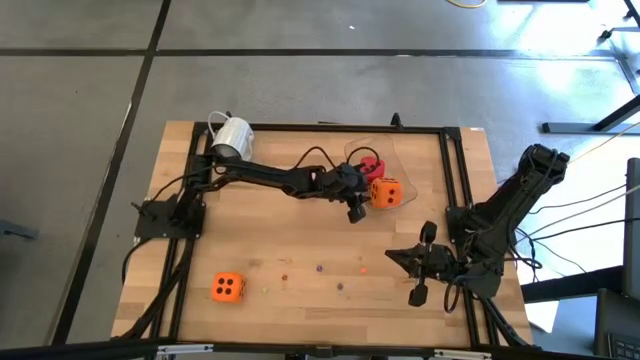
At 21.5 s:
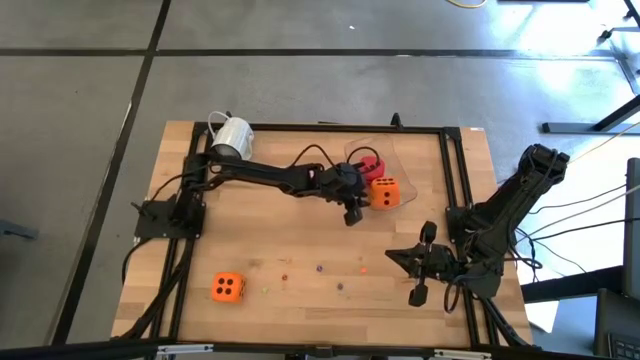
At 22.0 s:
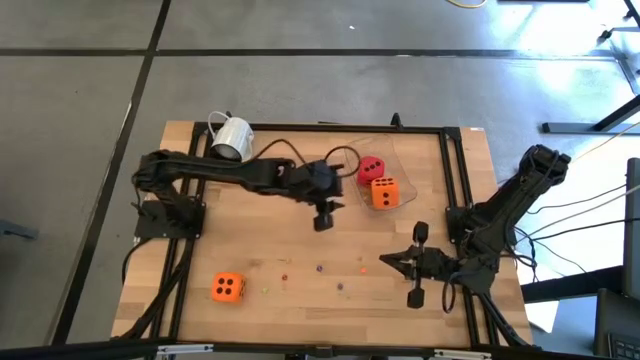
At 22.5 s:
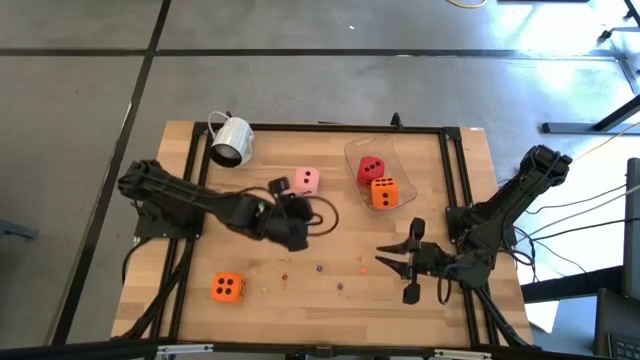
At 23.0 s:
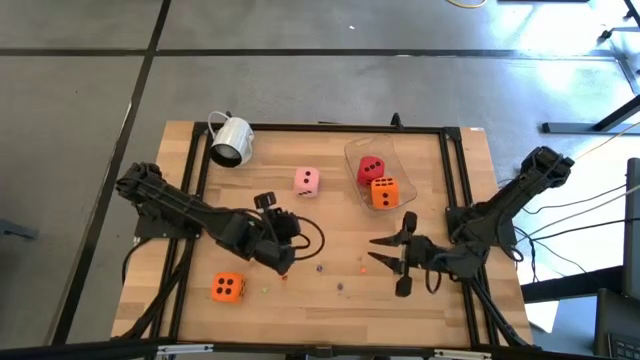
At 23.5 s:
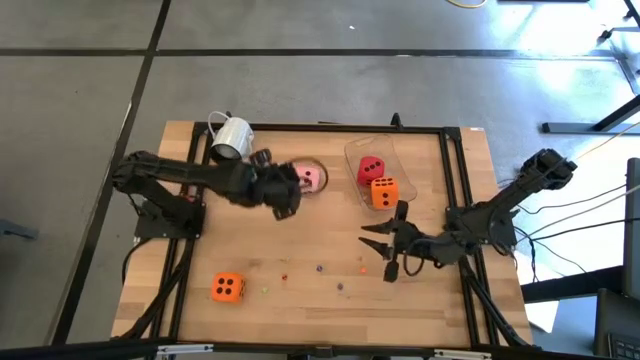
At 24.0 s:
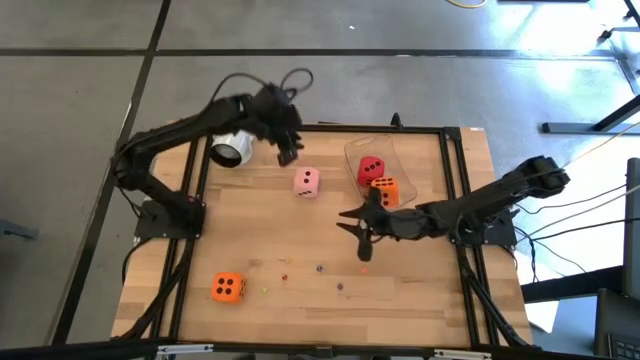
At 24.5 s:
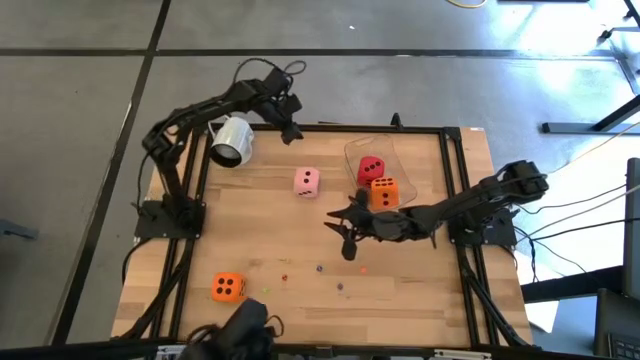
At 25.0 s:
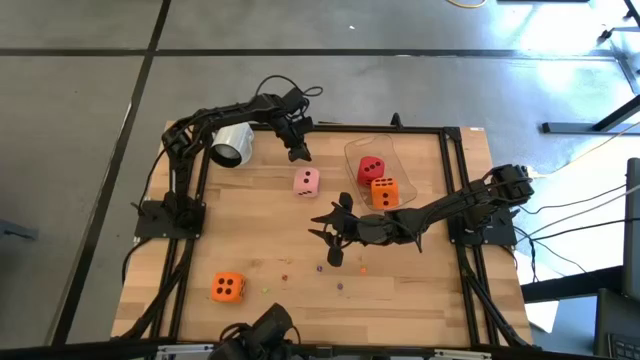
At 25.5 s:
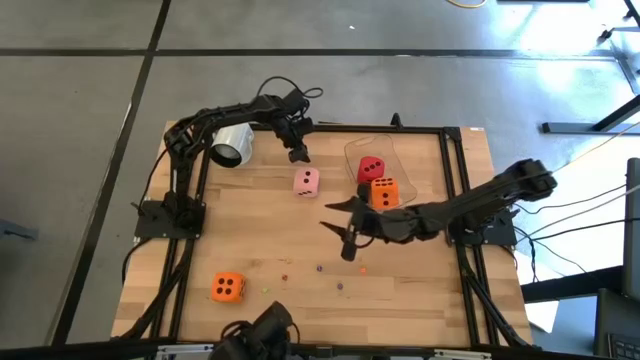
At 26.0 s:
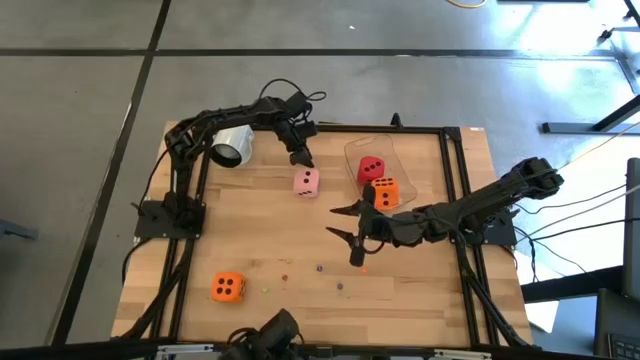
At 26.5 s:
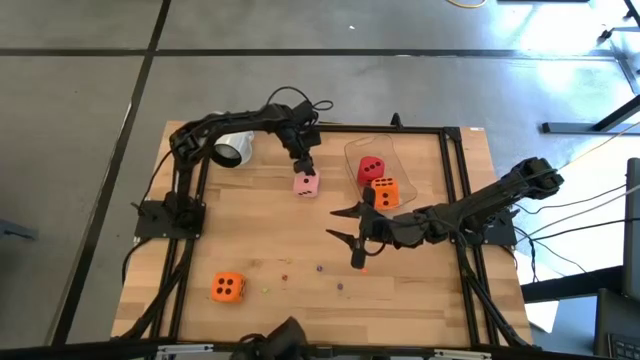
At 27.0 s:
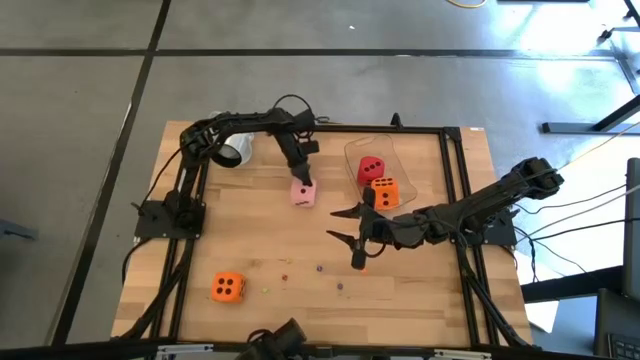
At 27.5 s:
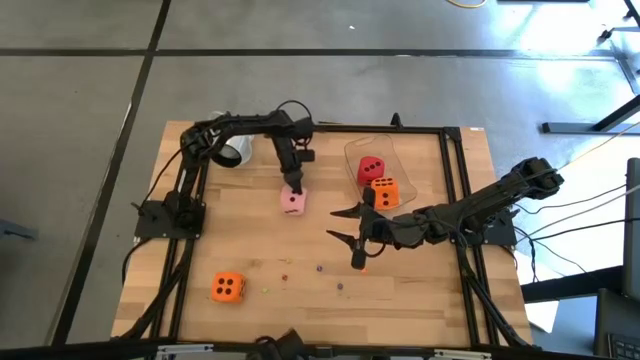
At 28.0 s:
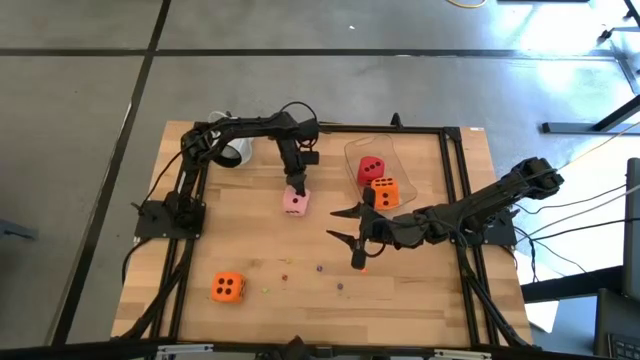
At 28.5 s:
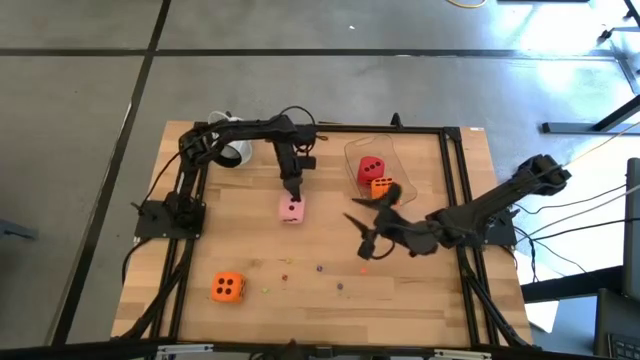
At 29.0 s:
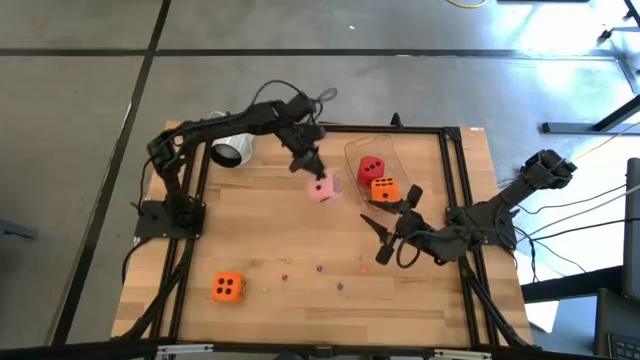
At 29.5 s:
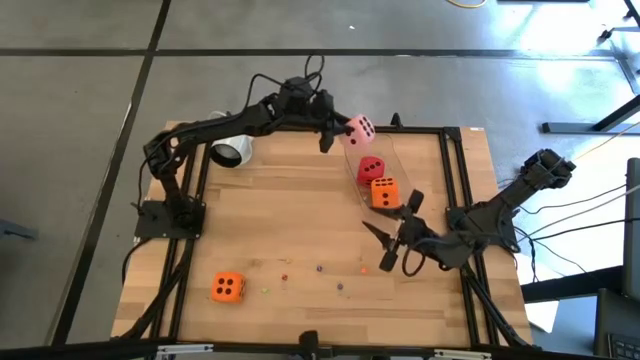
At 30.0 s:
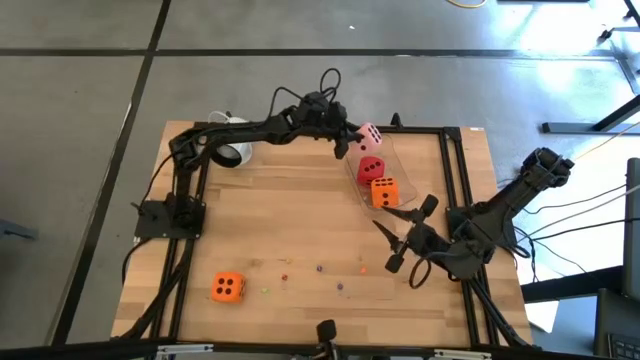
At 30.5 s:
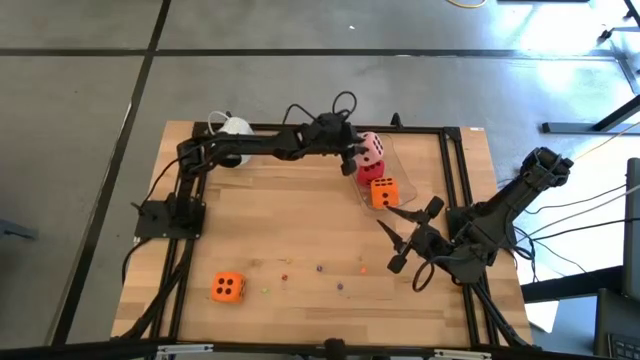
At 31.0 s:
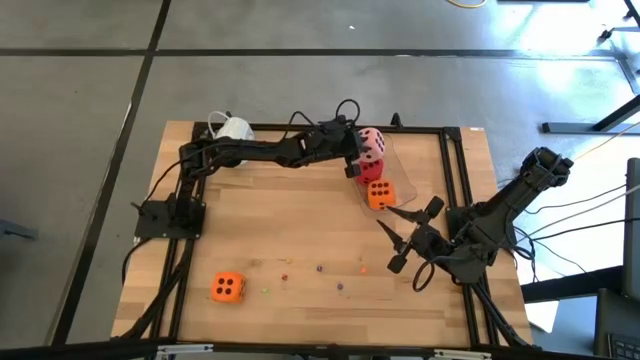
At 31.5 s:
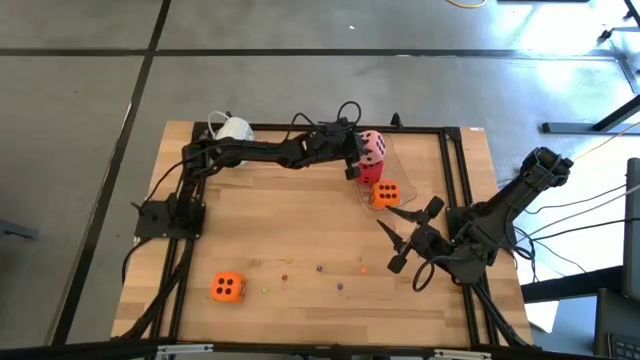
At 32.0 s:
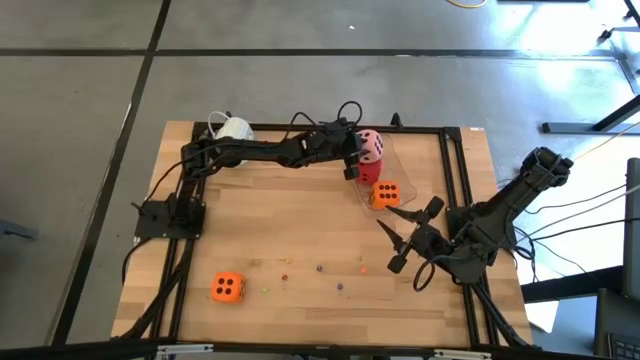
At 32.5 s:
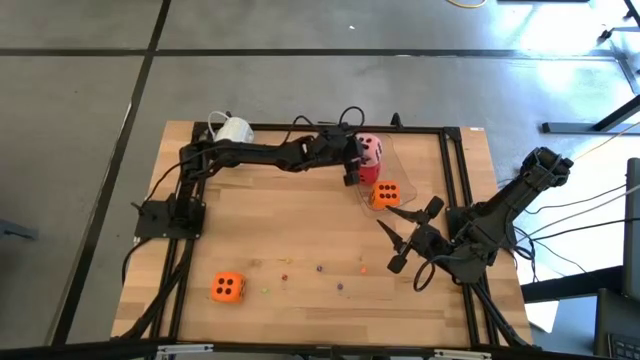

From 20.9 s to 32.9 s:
Task: Pick & Place Dice
Put the large pink die in the bin

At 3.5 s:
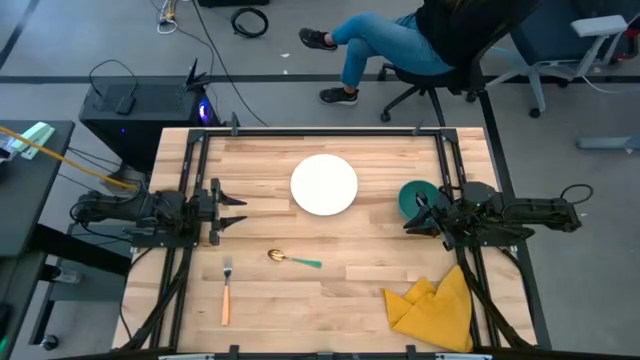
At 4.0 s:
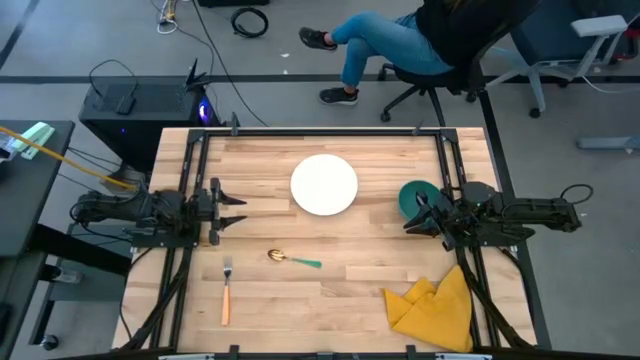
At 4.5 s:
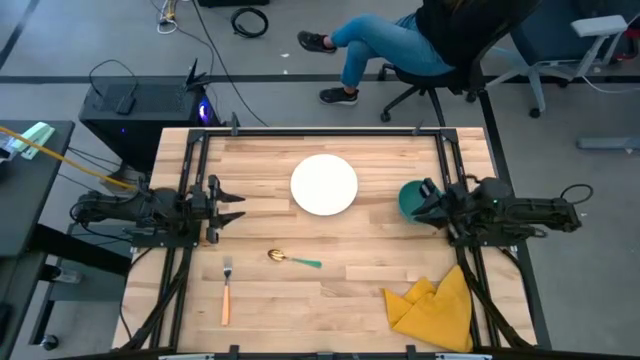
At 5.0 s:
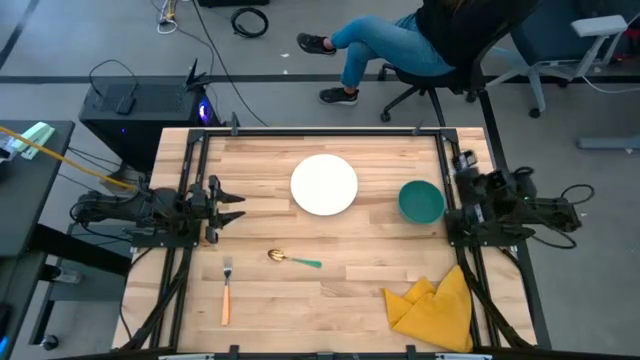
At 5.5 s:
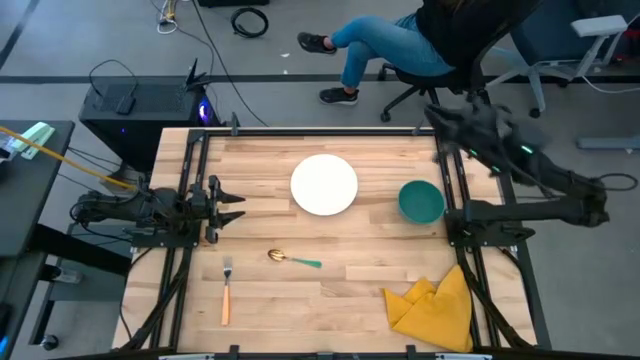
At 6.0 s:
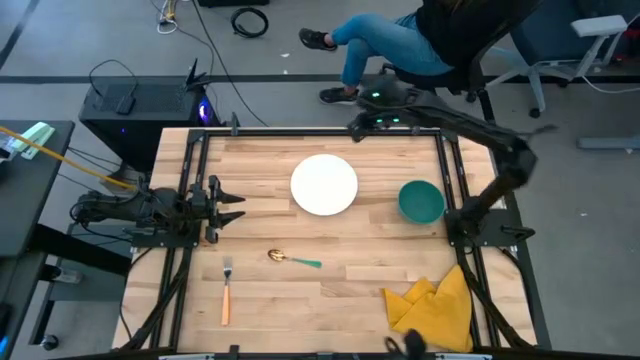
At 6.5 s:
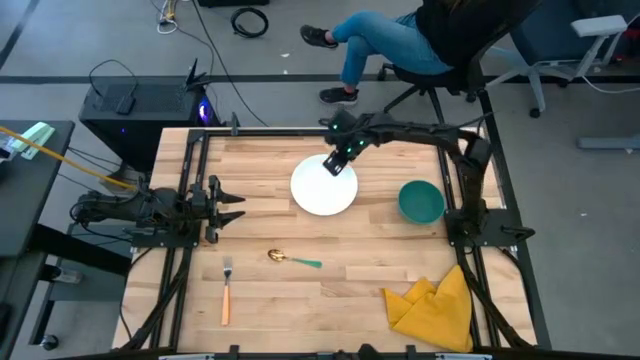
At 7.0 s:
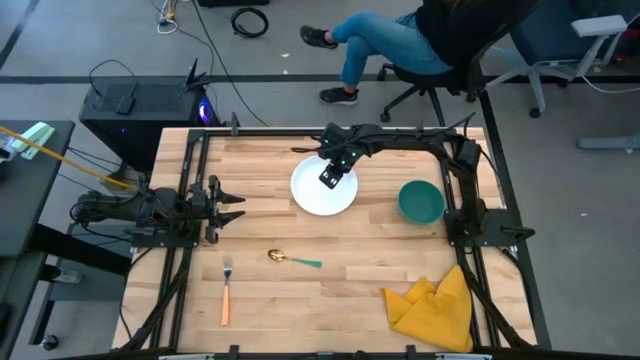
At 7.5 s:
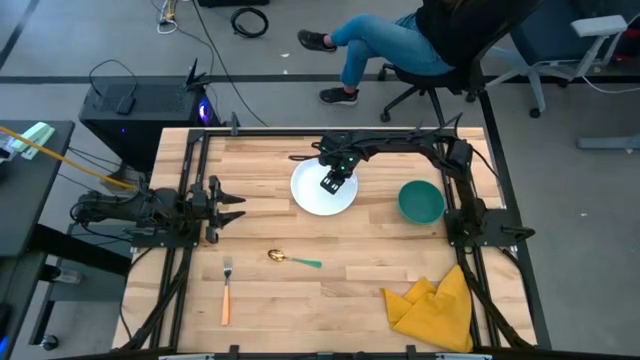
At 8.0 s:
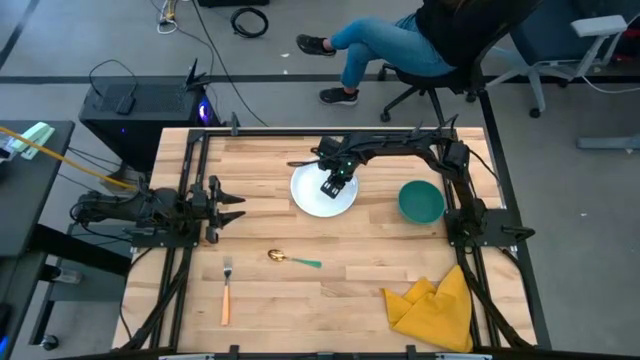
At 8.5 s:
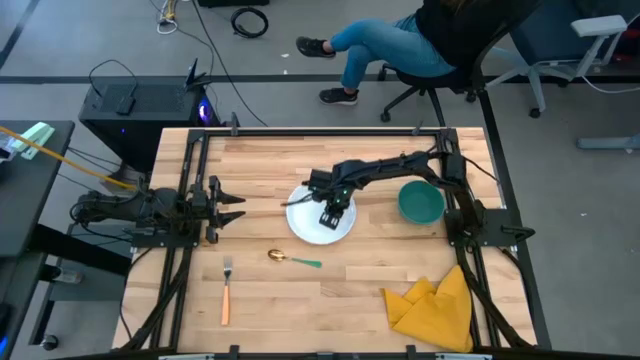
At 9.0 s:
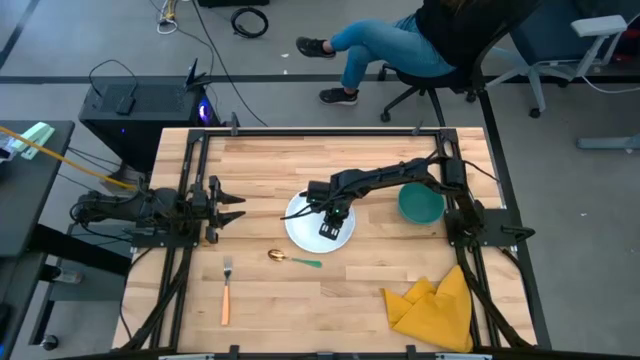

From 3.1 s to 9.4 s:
Task: Set table place
Move the white plate to the middle of the table
